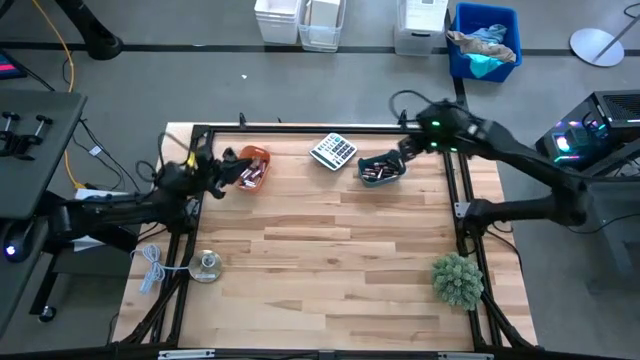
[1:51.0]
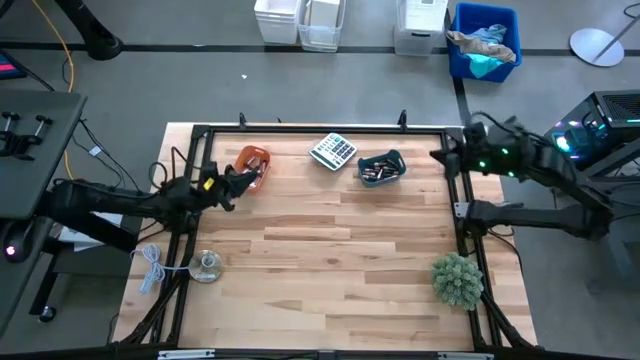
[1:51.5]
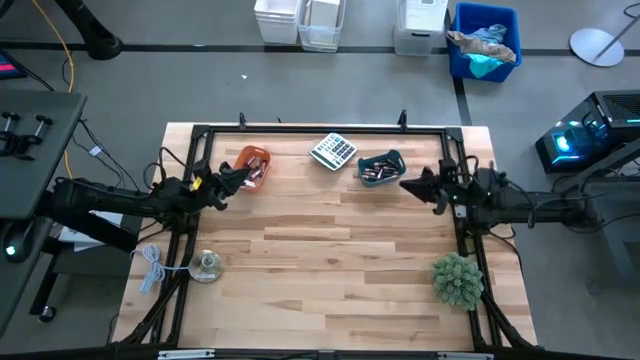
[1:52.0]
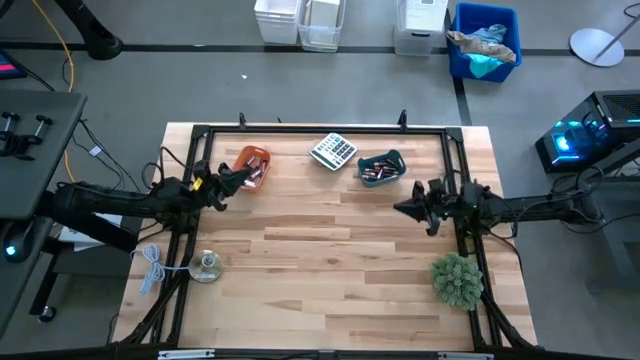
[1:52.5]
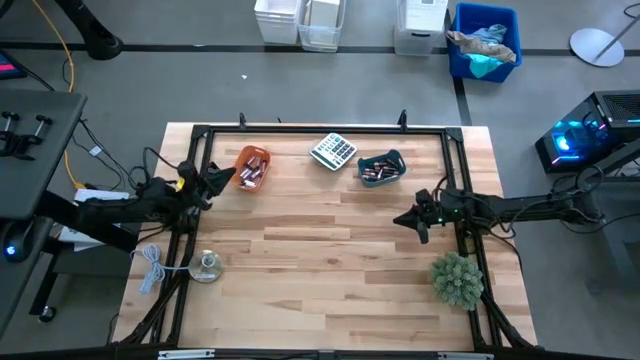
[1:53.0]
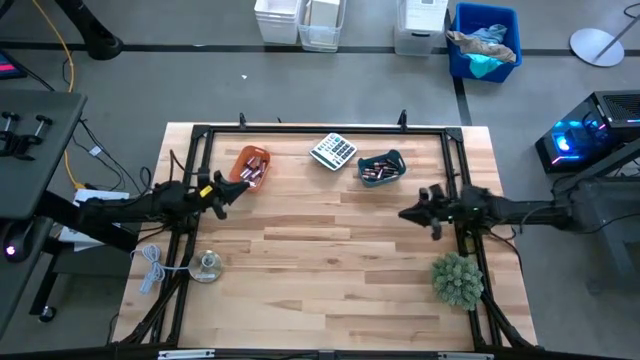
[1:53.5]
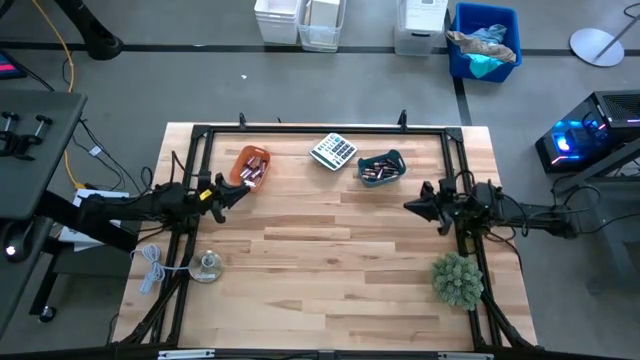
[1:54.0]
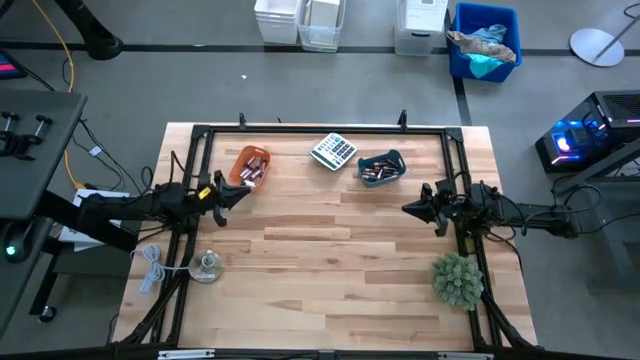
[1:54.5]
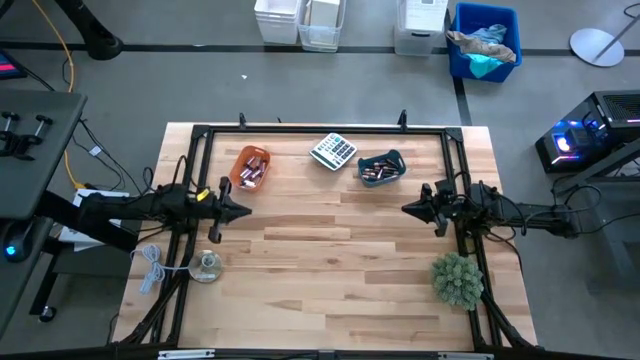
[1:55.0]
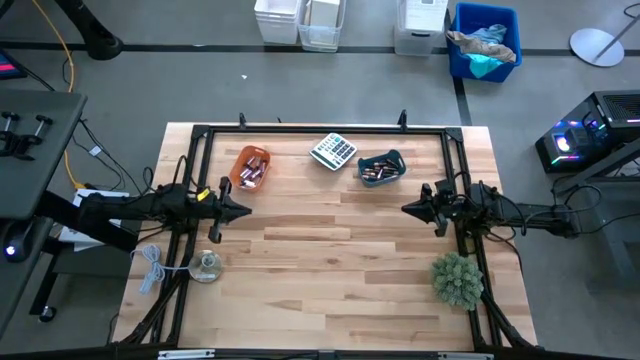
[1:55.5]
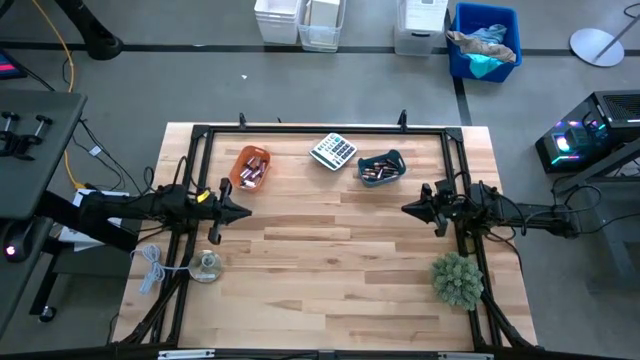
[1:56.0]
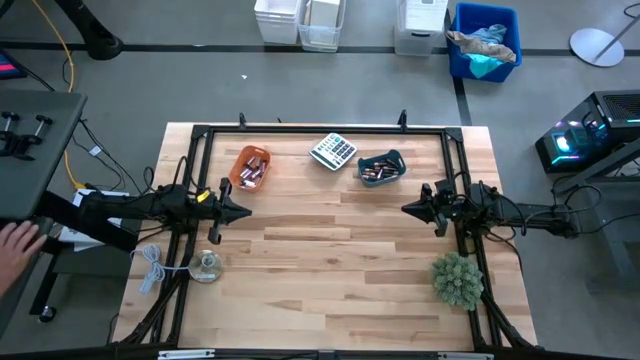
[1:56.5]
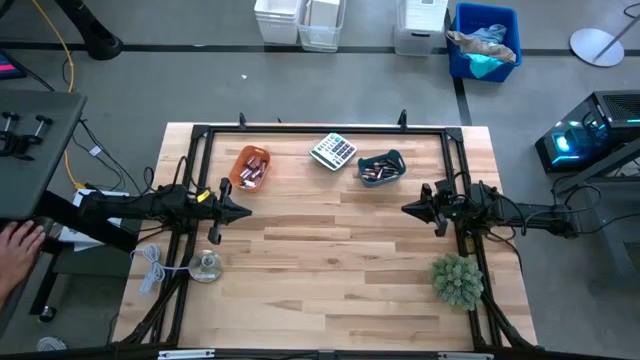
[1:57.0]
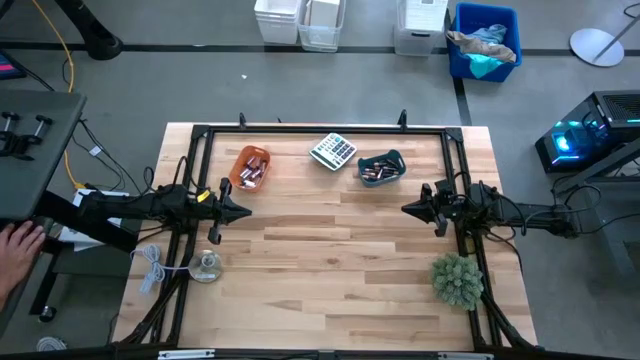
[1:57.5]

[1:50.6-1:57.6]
Task: Sort batteries
Return to Home Position

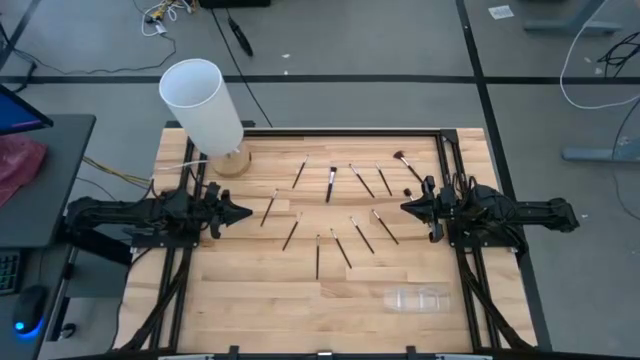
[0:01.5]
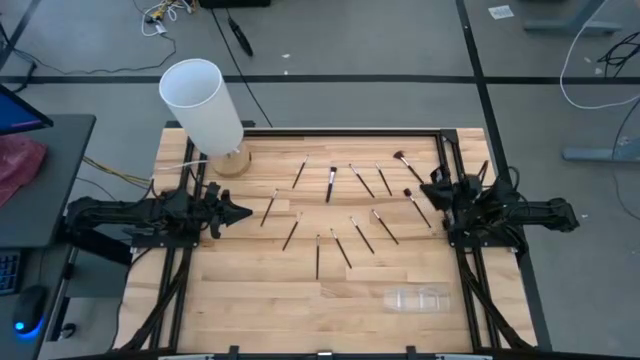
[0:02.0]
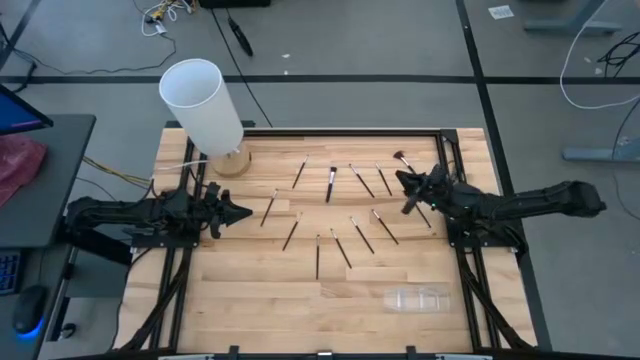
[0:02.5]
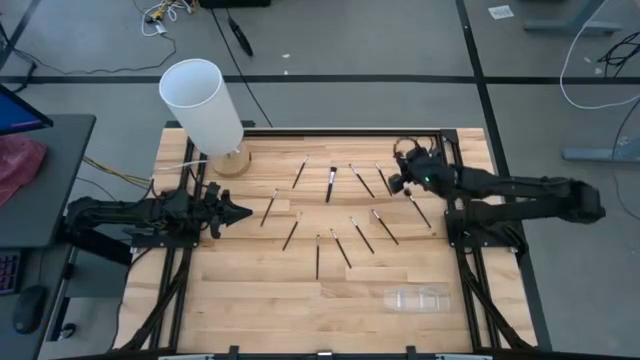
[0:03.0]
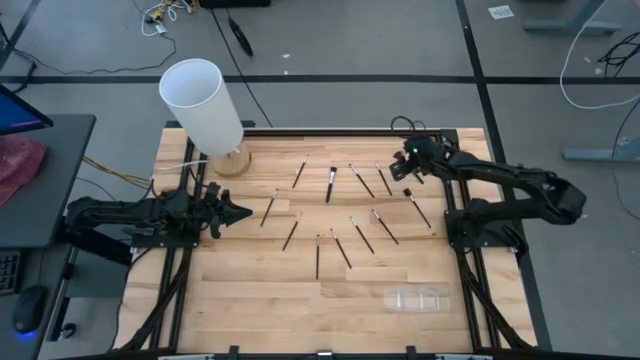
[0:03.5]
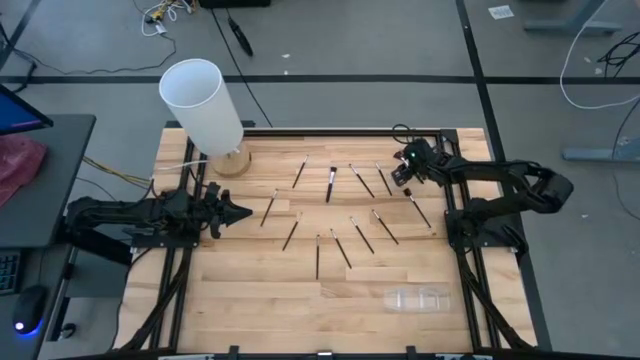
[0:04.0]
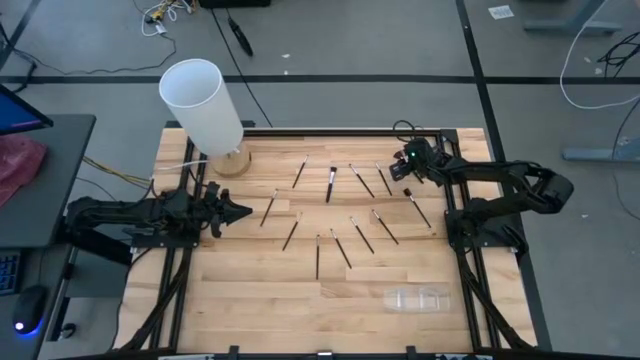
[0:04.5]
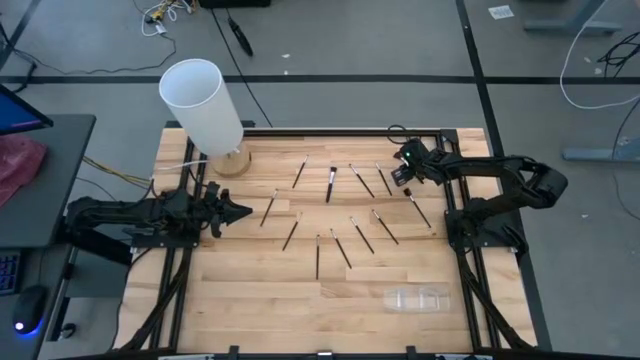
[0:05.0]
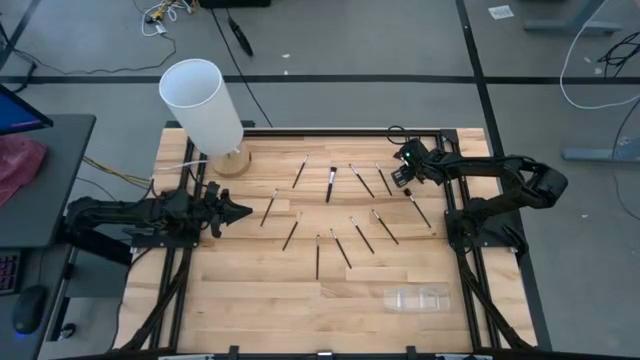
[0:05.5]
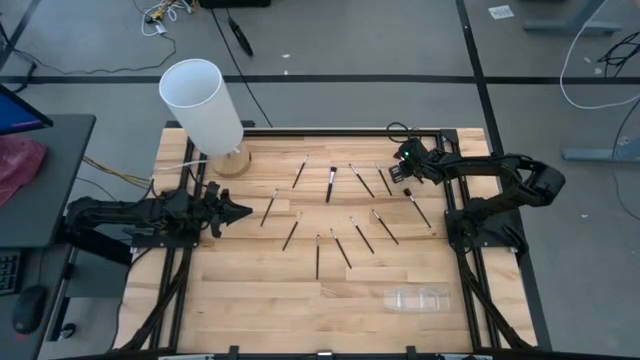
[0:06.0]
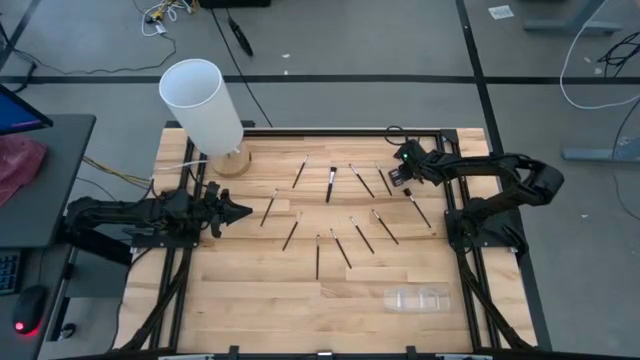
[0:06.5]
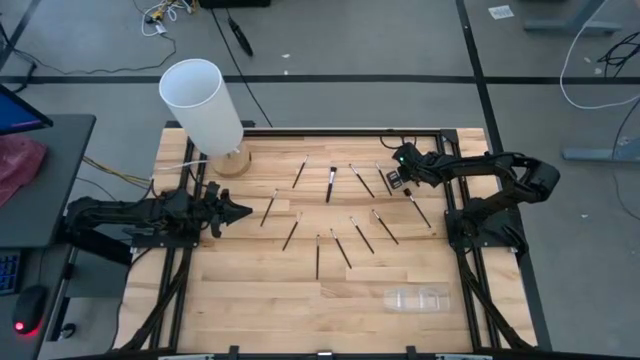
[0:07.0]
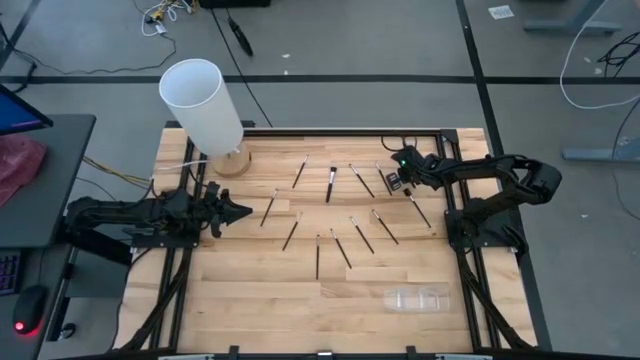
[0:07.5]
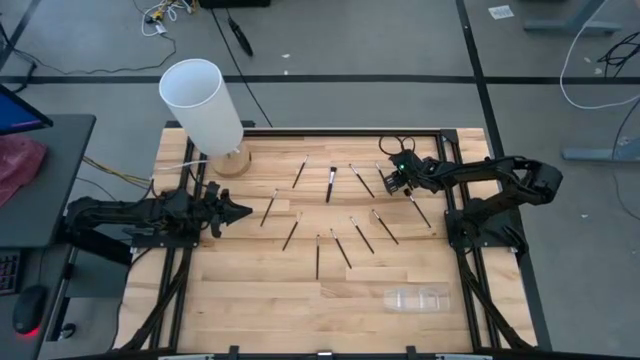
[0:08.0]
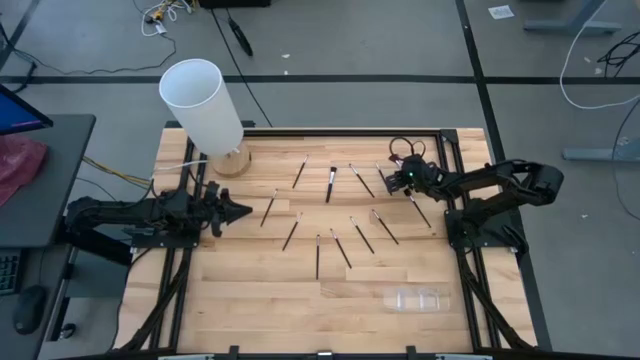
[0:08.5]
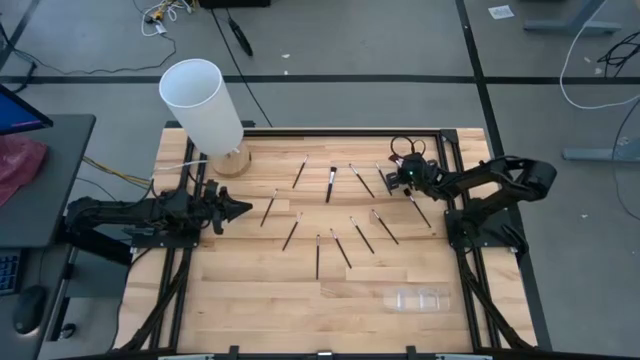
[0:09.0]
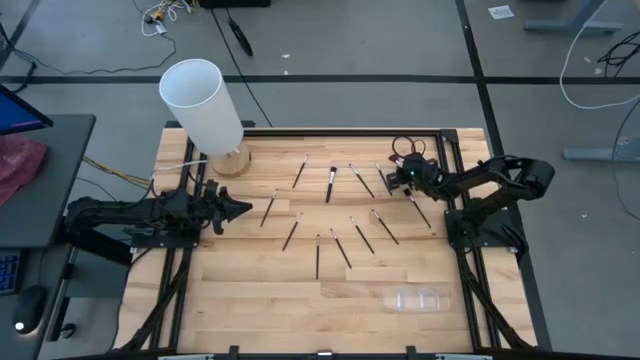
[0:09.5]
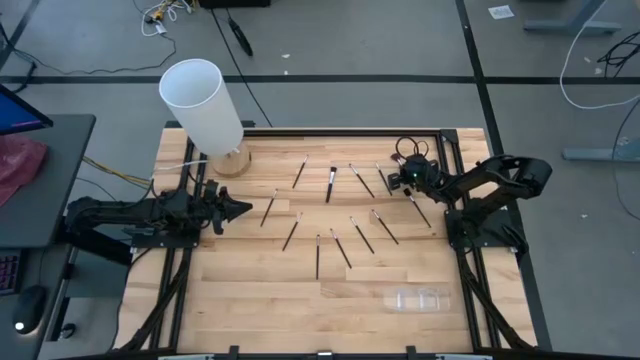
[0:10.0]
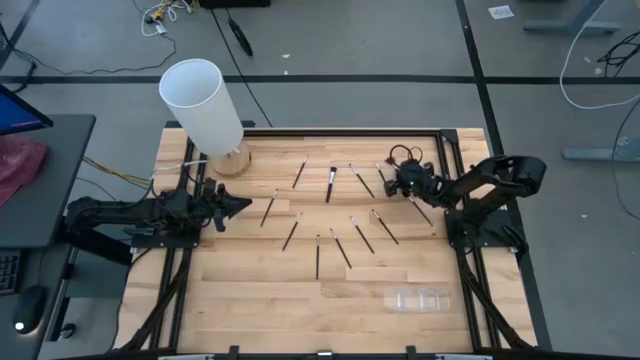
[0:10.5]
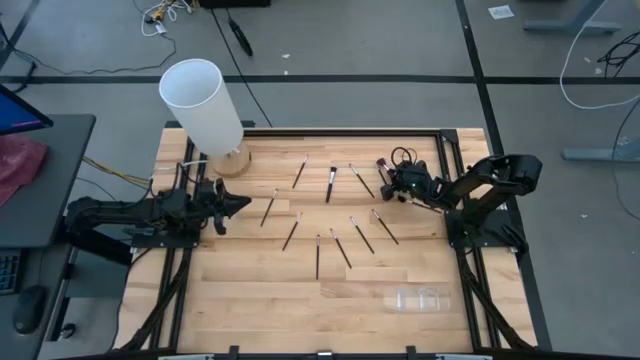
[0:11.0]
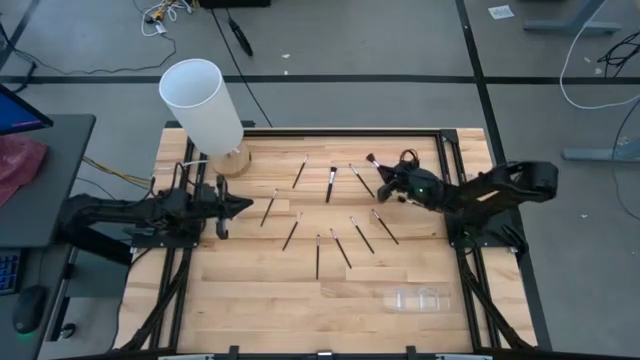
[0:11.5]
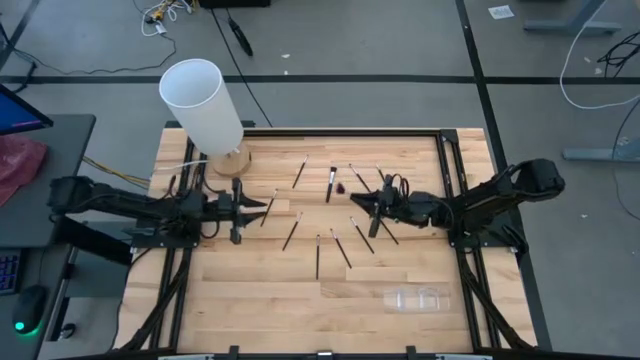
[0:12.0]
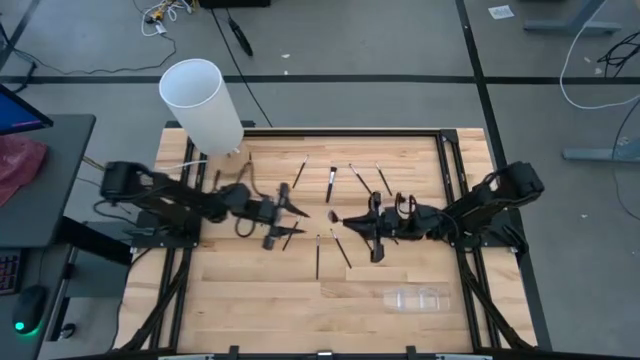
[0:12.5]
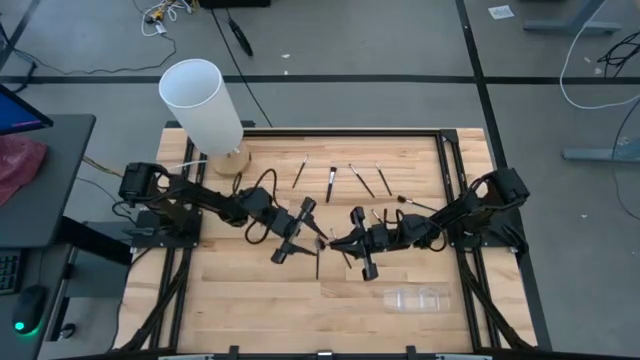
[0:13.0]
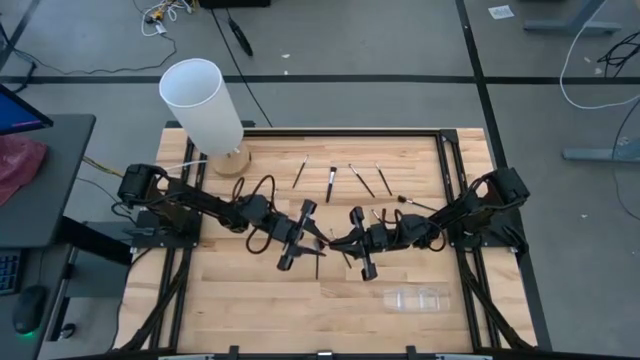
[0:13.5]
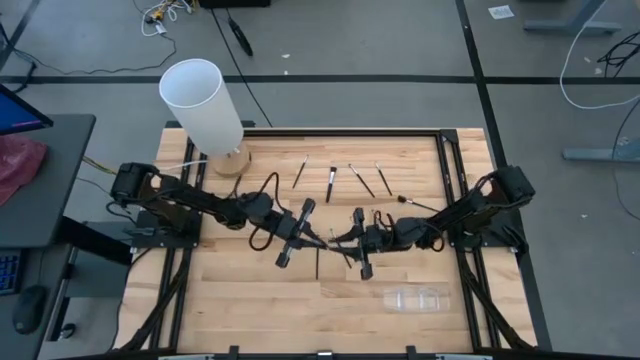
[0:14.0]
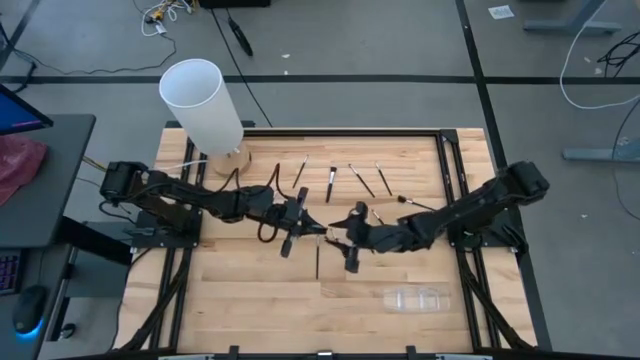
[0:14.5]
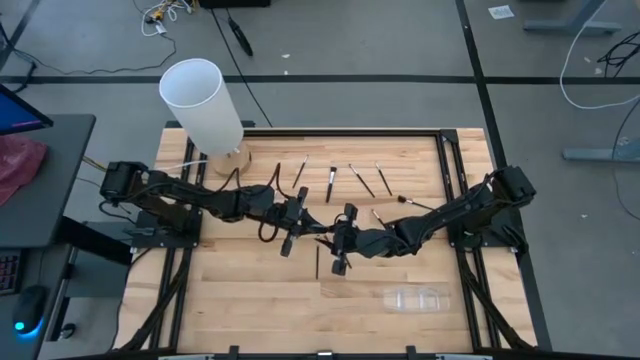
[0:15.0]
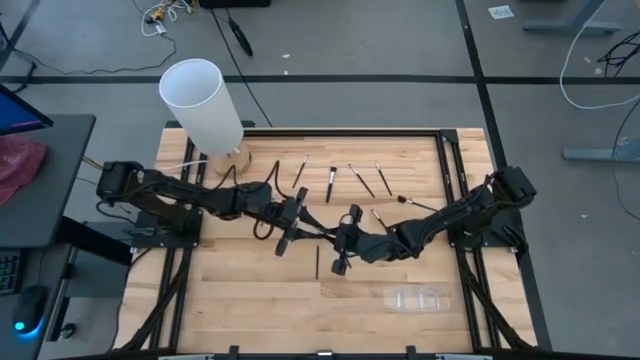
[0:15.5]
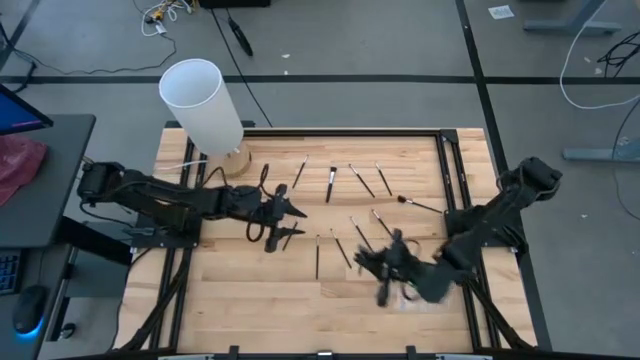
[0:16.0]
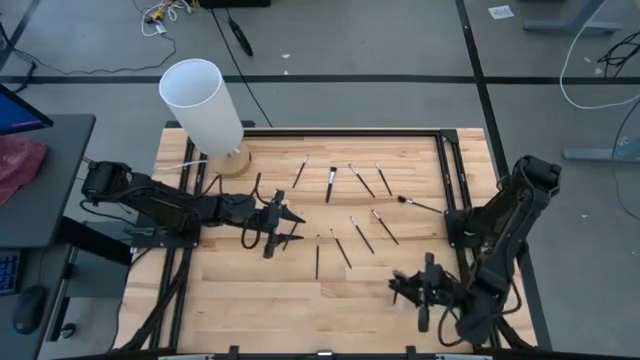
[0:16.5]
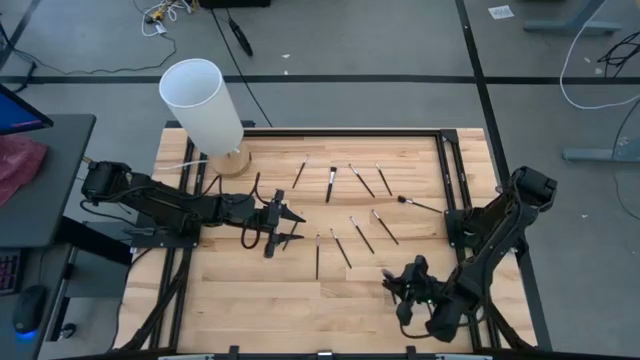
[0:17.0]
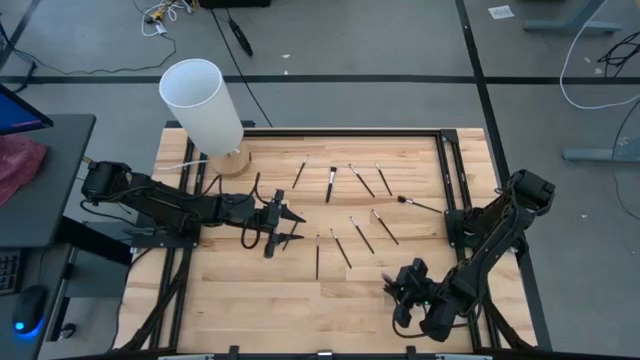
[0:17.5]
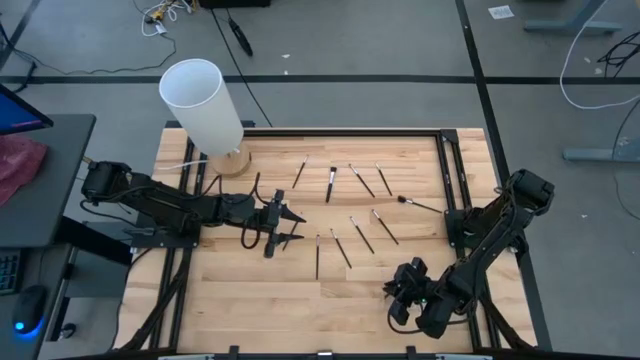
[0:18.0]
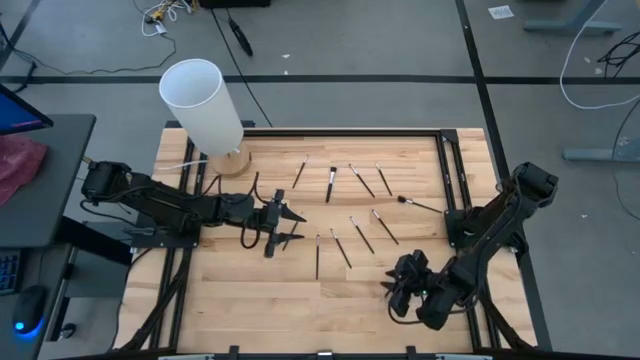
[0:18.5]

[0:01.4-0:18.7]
Task: Pick & Place Makeup Supplies
Put the silver makeup brush into the transparent organizer
